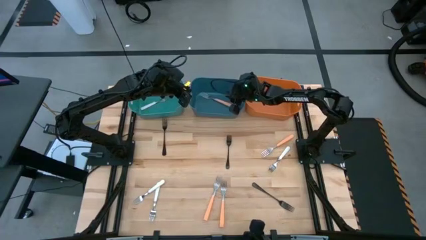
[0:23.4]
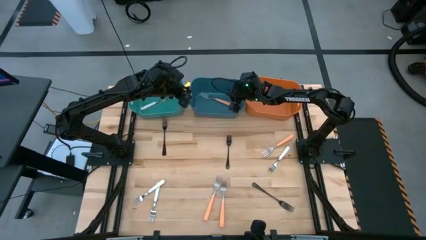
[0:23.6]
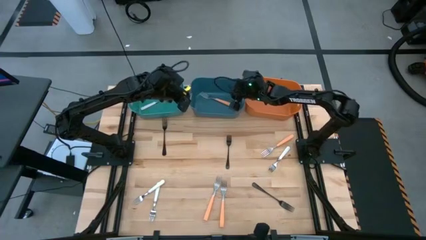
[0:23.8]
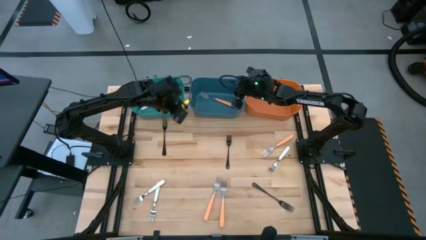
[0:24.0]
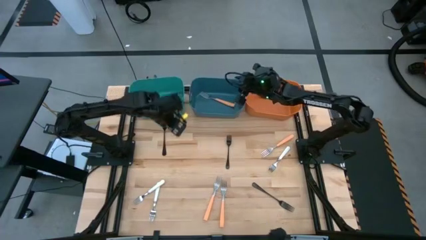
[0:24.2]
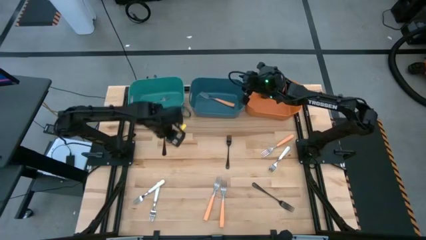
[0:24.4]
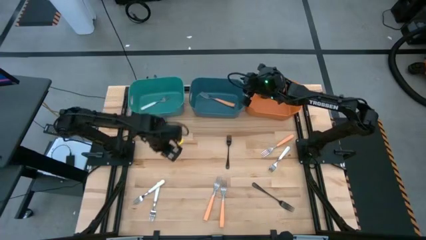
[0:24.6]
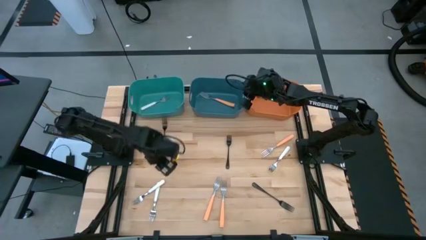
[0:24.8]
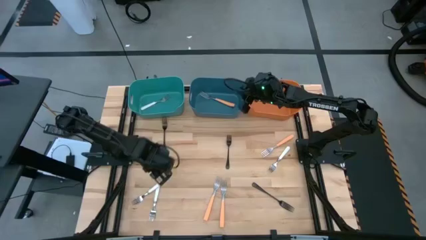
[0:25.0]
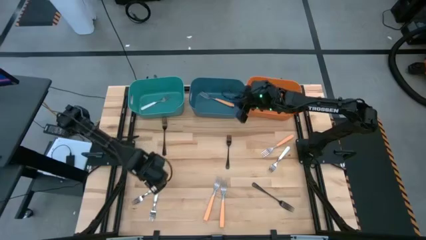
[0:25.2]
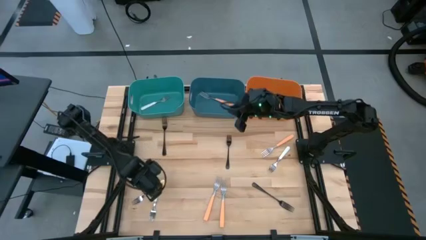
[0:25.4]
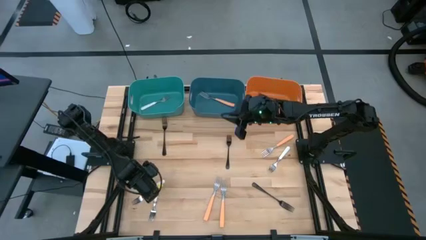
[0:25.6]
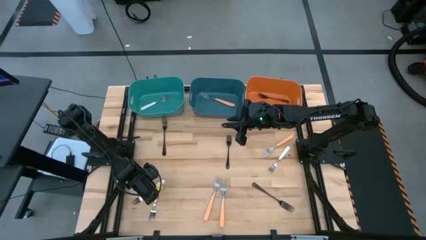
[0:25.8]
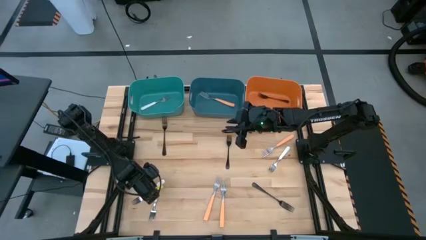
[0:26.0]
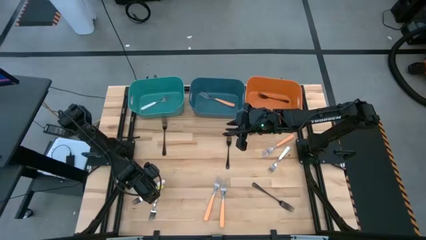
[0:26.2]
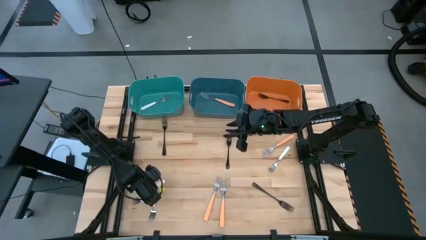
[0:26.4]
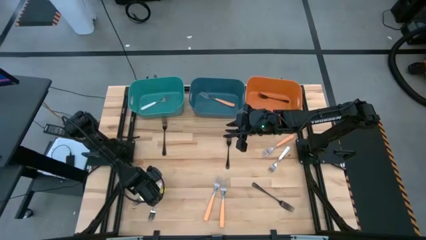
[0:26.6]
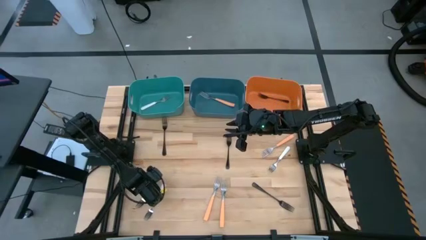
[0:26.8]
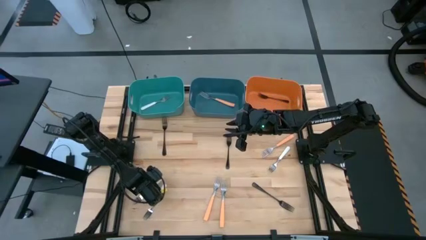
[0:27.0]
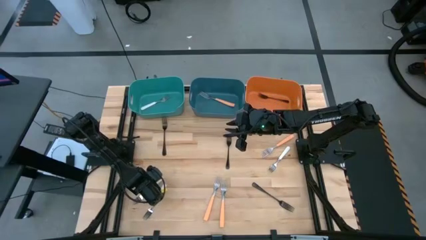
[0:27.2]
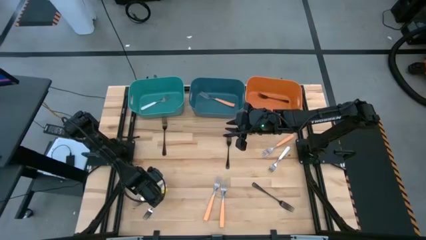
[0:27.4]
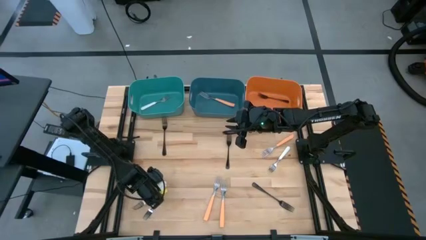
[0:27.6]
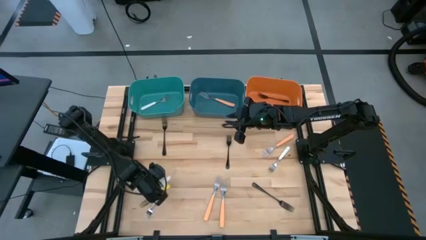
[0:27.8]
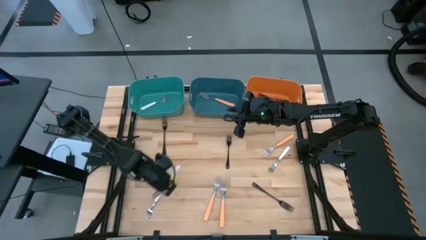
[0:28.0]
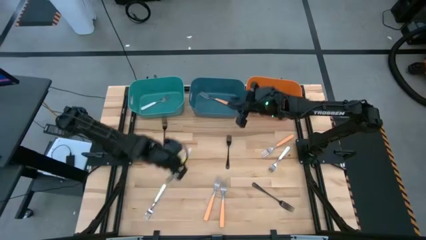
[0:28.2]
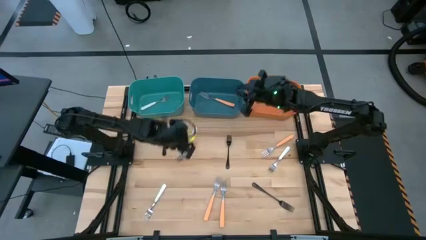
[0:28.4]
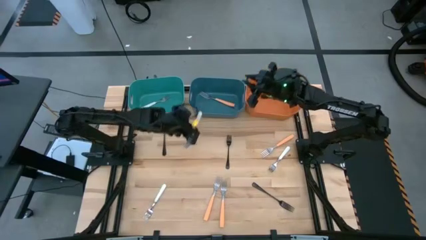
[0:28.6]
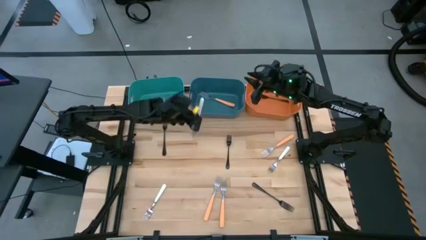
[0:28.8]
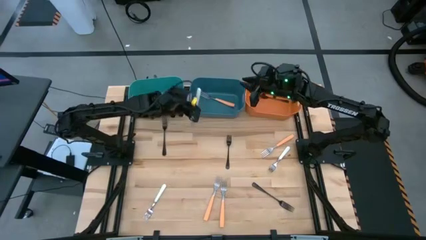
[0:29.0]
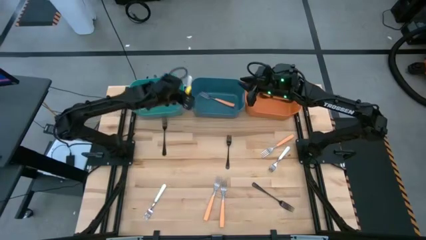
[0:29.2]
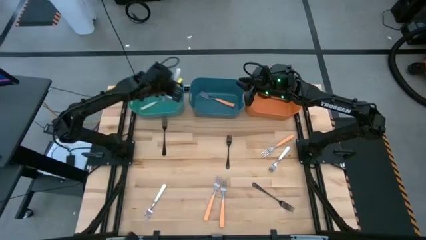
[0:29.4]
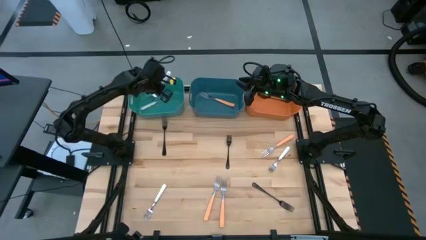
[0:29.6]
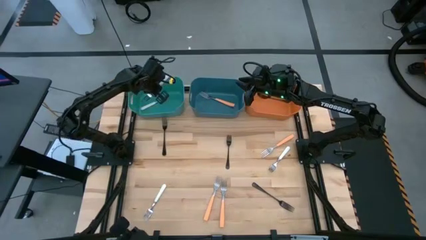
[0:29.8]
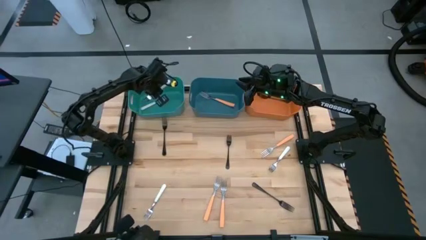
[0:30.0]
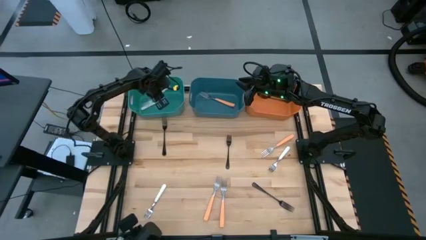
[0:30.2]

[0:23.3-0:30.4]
Task: Sort silverware by color (type)
Put the top left white fork into the light green bin

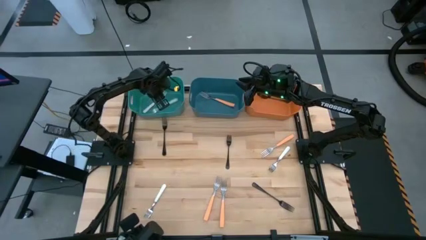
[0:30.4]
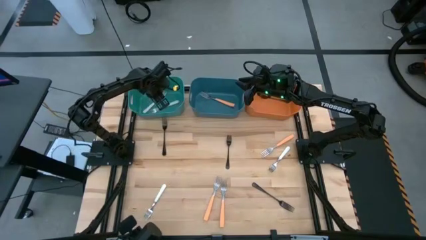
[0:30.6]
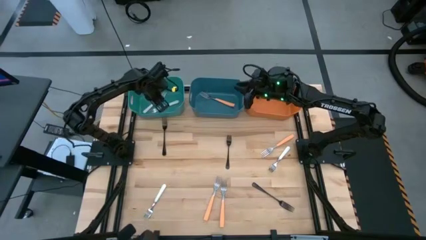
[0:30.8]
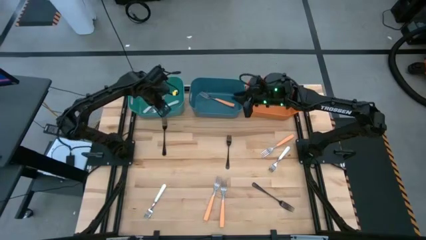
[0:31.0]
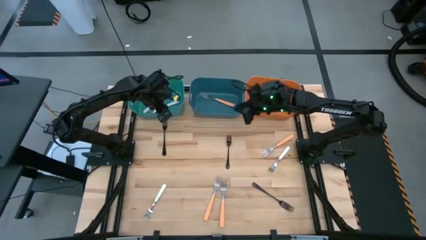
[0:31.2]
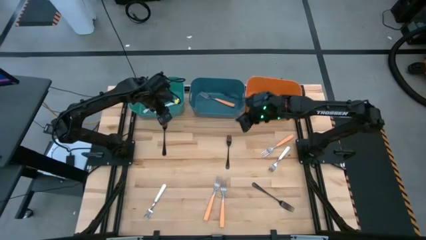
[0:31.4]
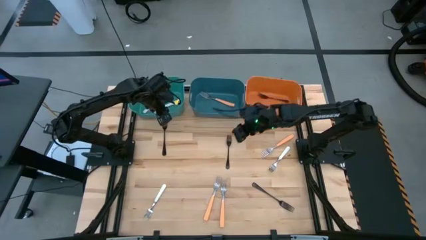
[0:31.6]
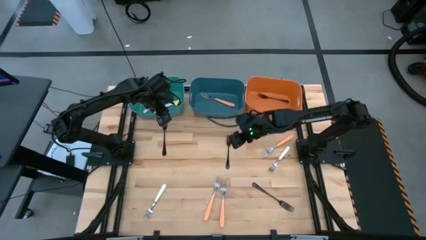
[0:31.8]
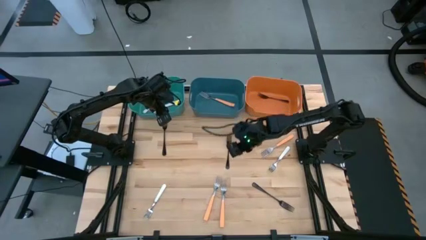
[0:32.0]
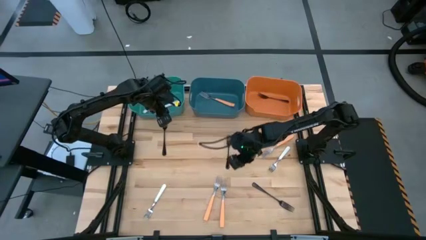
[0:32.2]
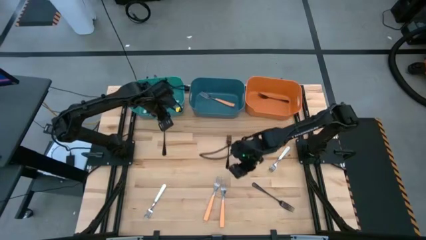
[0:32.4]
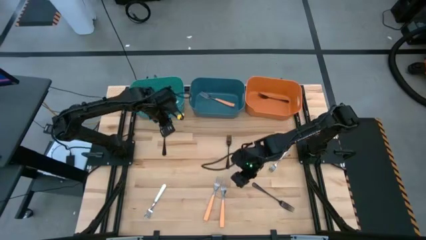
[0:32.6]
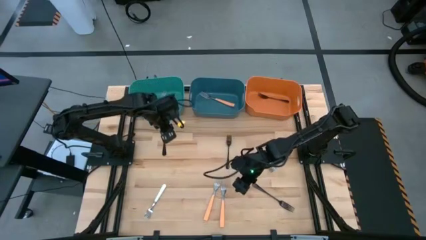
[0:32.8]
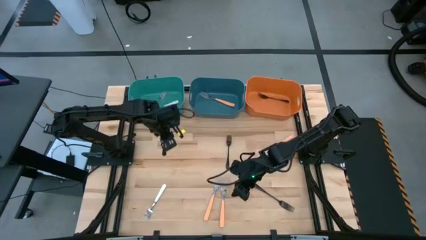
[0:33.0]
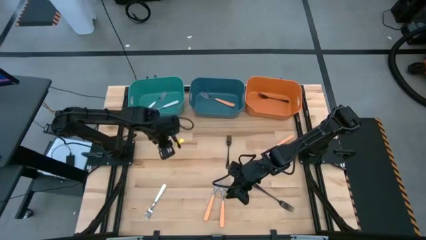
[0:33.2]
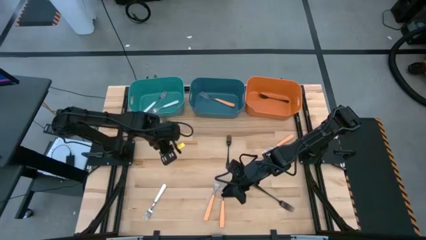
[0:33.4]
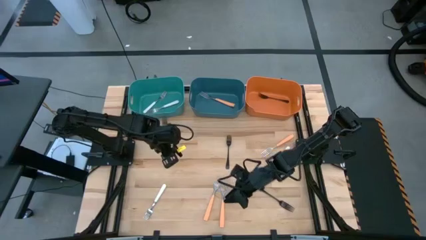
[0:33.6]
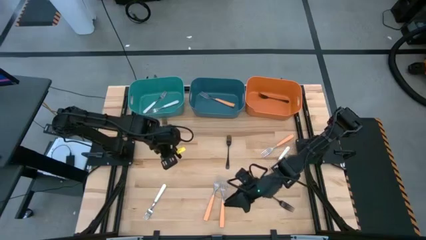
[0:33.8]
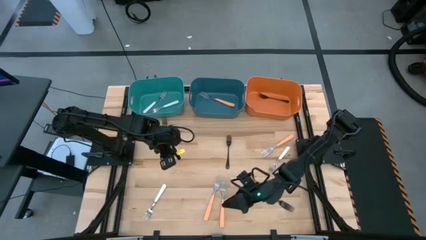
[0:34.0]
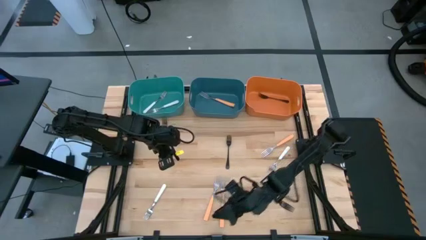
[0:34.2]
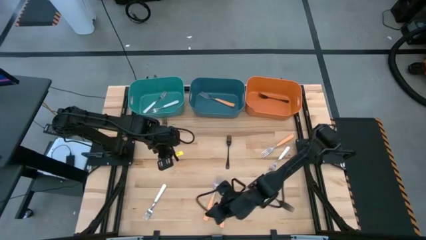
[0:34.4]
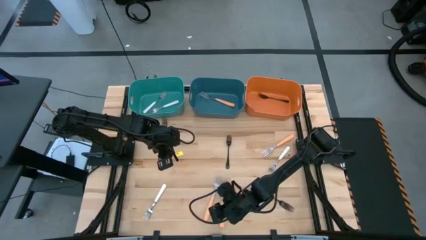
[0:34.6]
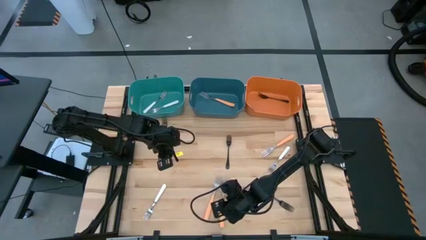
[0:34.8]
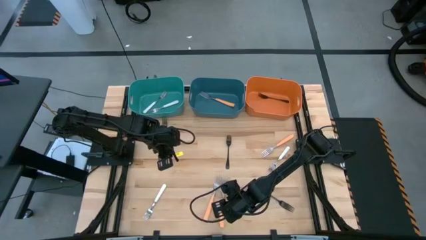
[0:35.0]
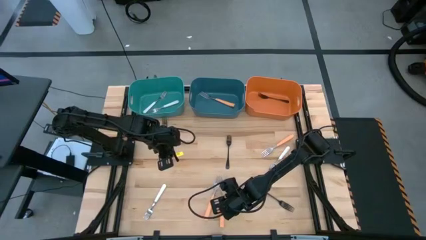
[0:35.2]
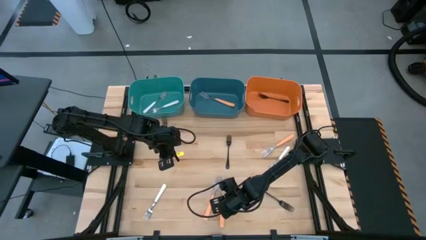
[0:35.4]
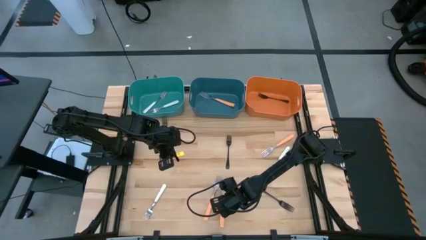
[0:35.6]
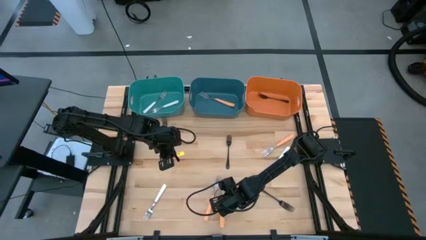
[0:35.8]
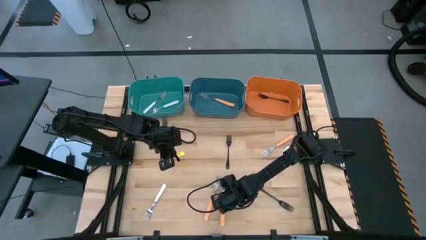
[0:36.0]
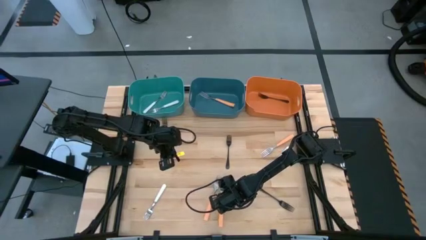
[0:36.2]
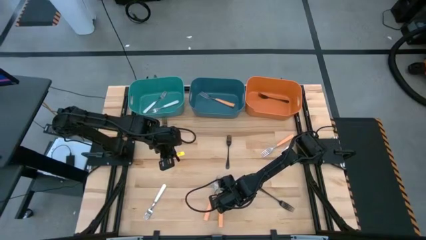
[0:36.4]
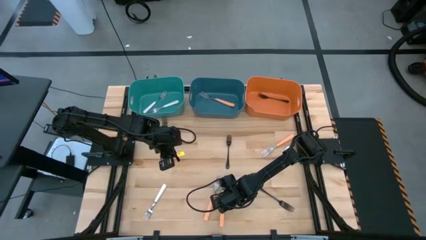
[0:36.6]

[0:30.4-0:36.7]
Put the bottom right orange fork into the blue bin

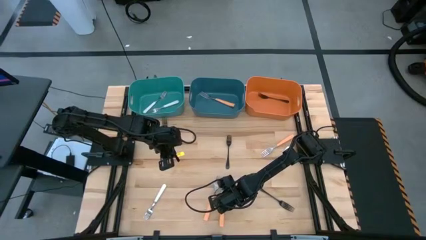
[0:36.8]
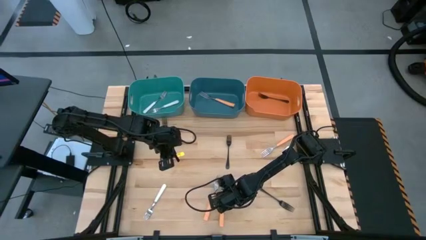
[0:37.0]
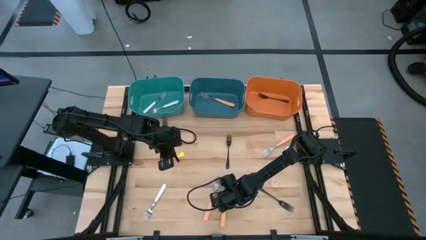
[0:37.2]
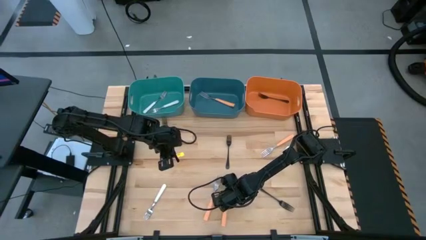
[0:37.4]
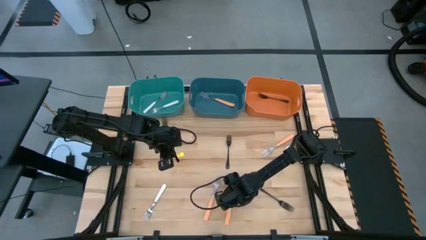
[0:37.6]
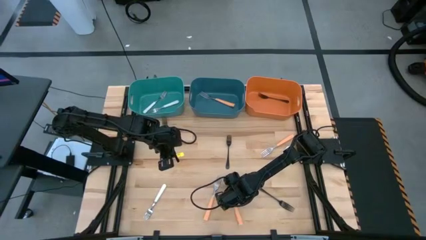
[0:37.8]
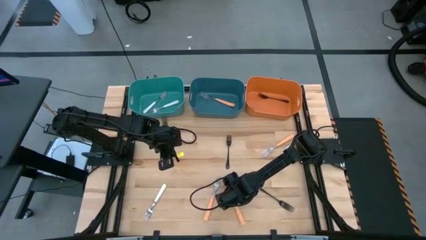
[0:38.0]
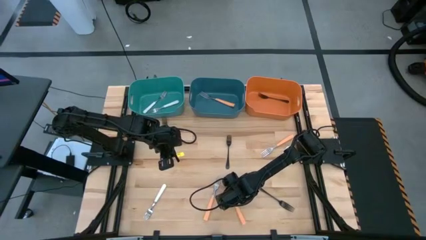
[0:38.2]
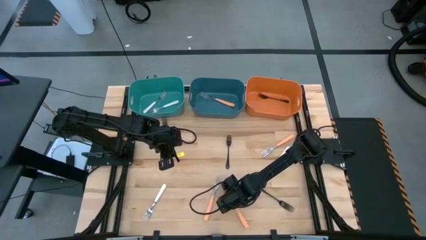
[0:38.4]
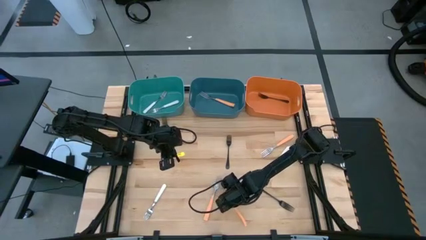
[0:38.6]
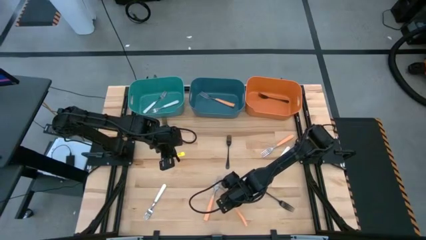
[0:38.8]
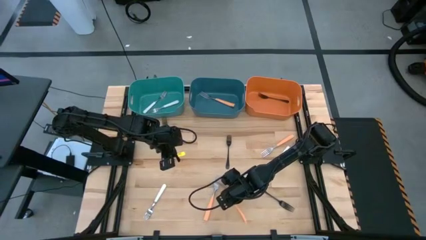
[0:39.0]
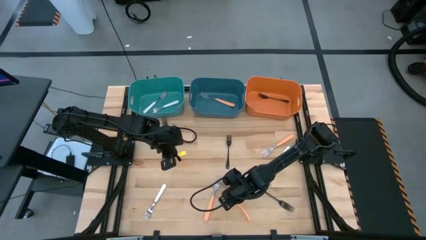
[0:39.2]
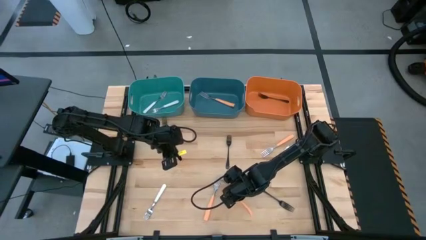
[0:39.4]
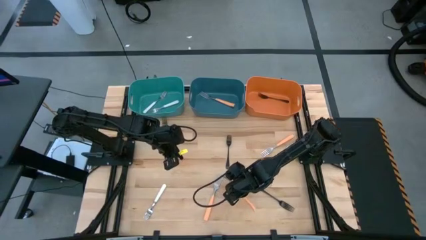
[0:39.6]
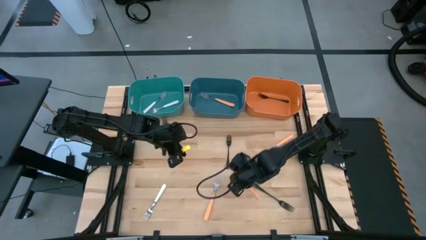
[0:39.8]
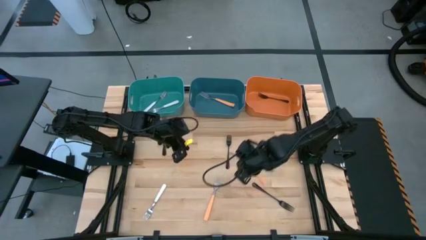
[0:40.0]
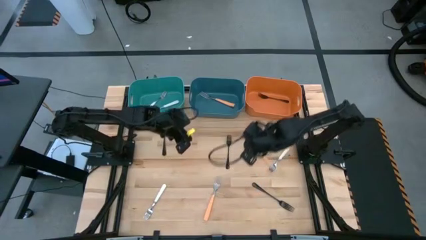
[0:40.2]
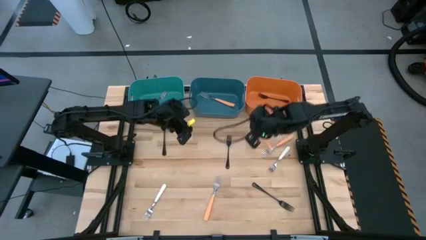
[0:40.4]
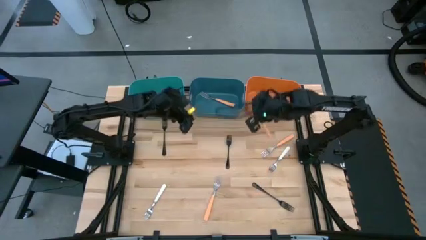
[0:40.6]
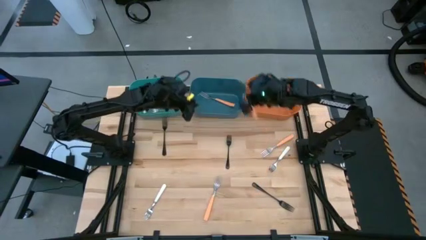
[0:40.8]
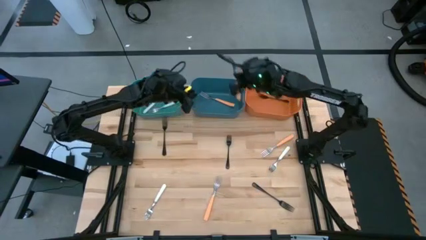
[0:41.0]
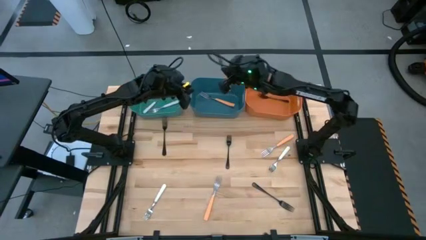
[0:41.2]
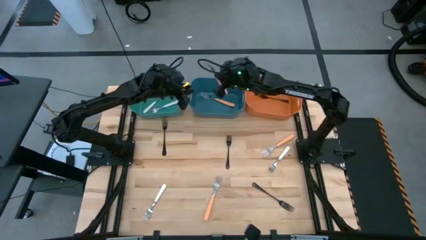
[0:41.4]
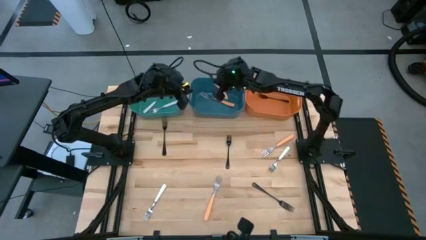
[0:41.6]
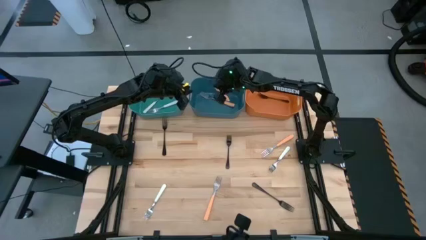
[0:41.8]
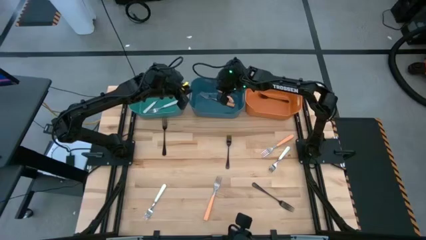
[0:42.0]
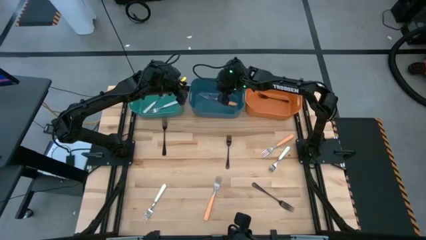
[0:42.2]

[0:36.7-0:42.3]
Put the bottom right orange fork into the blue bin
